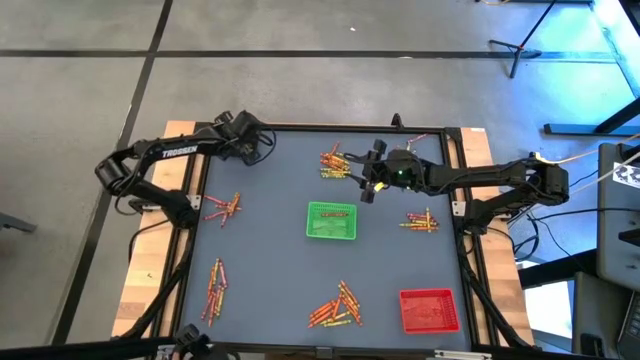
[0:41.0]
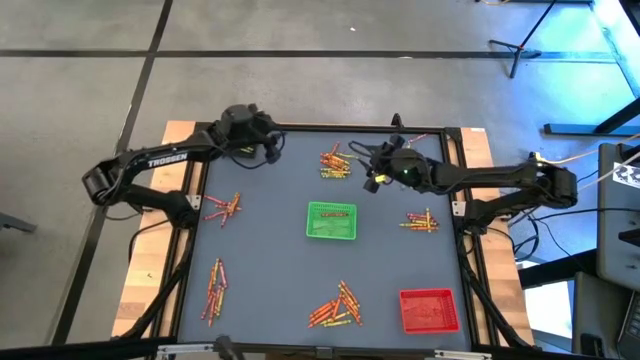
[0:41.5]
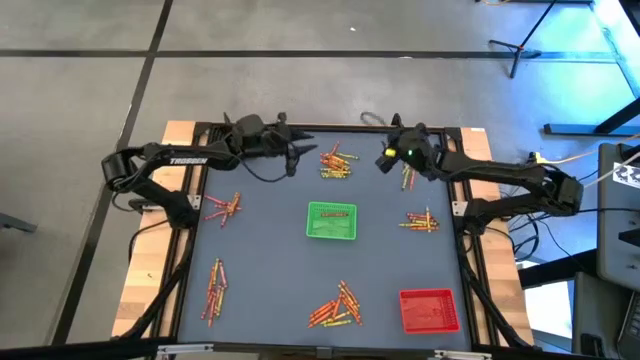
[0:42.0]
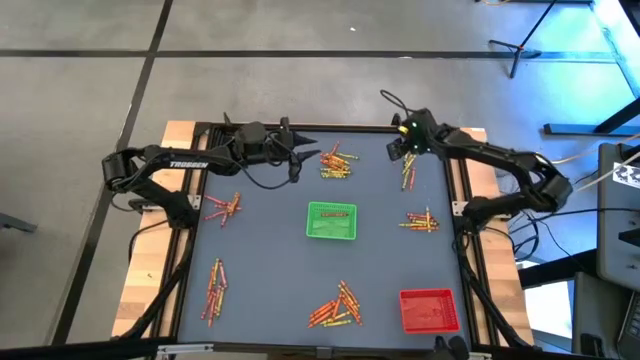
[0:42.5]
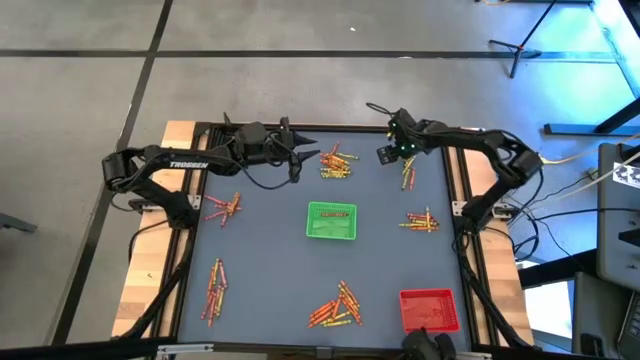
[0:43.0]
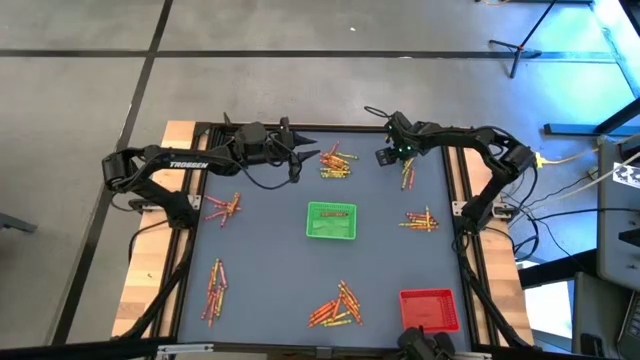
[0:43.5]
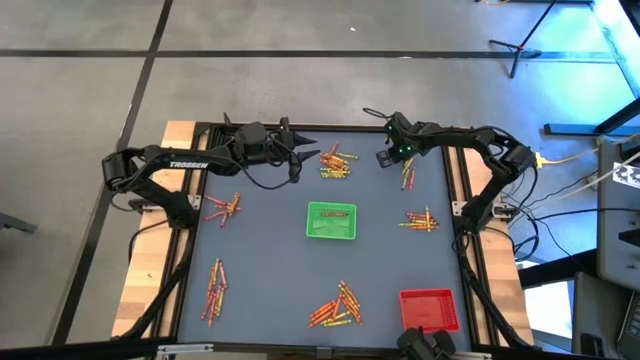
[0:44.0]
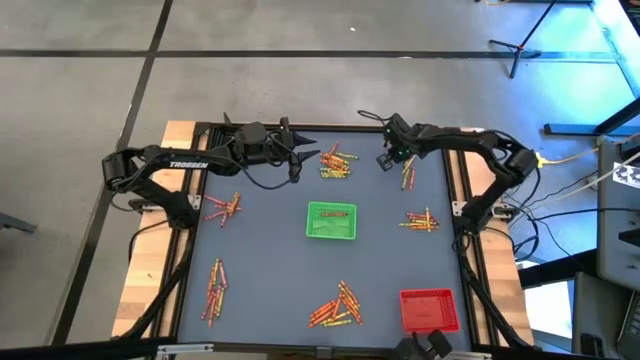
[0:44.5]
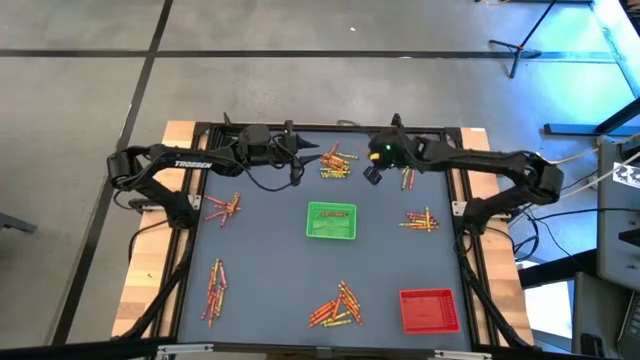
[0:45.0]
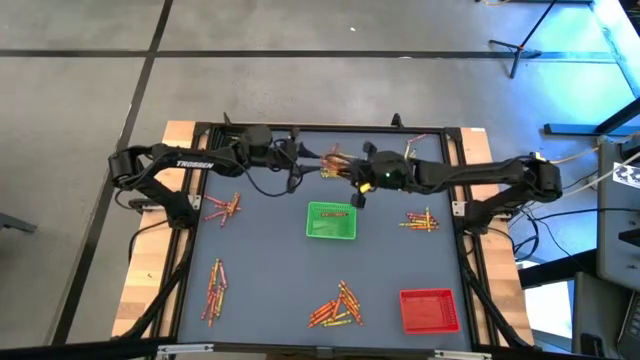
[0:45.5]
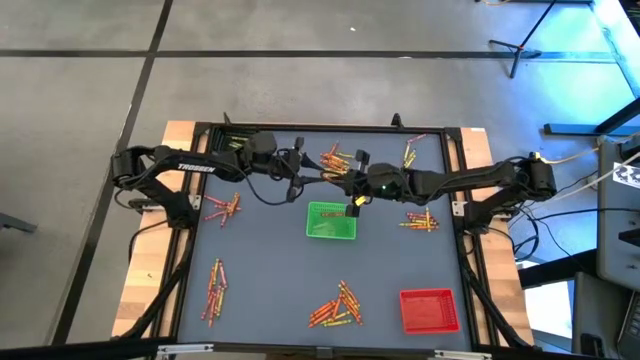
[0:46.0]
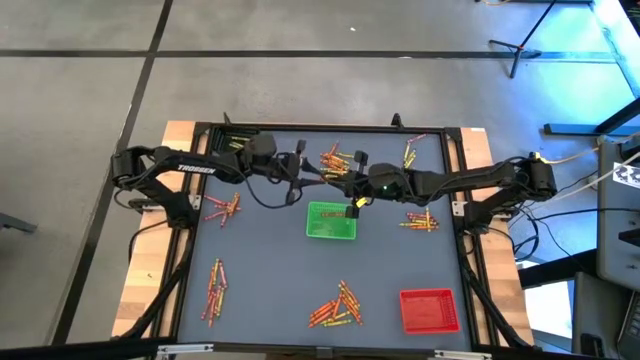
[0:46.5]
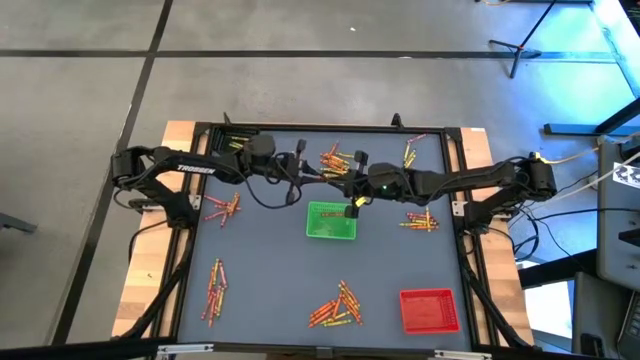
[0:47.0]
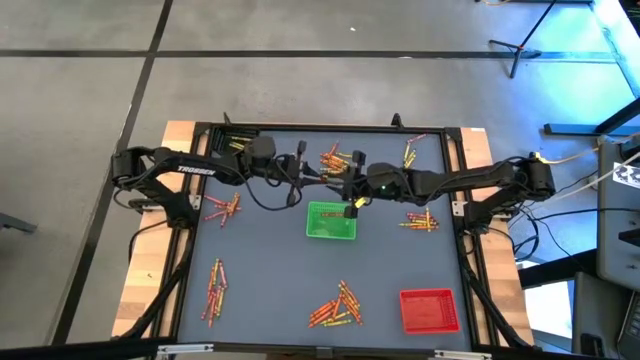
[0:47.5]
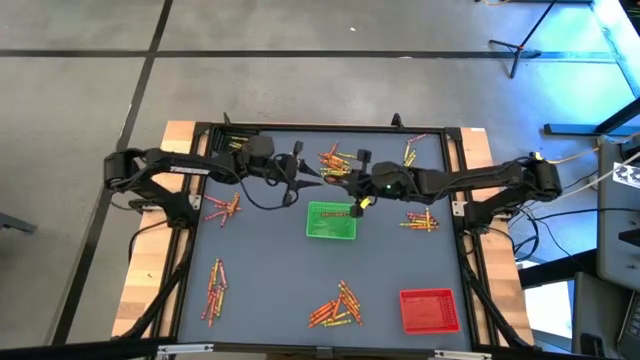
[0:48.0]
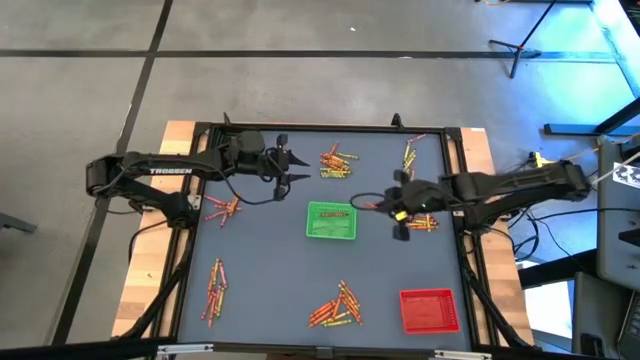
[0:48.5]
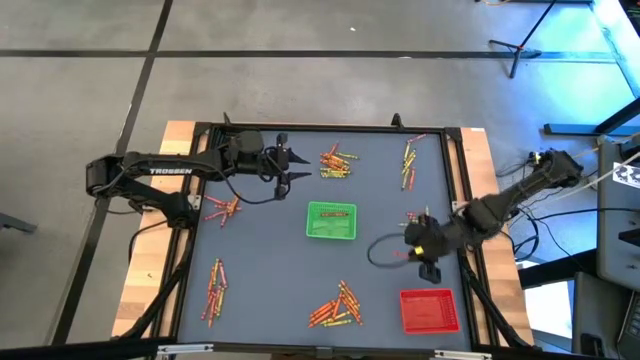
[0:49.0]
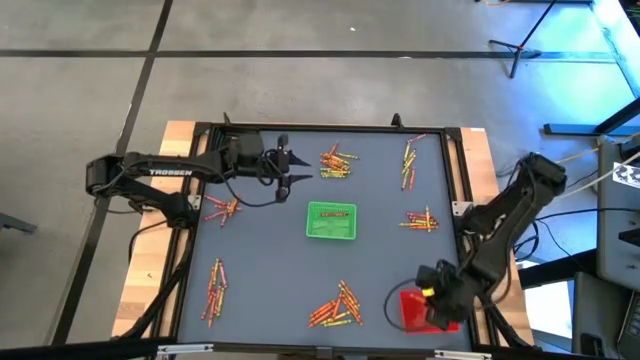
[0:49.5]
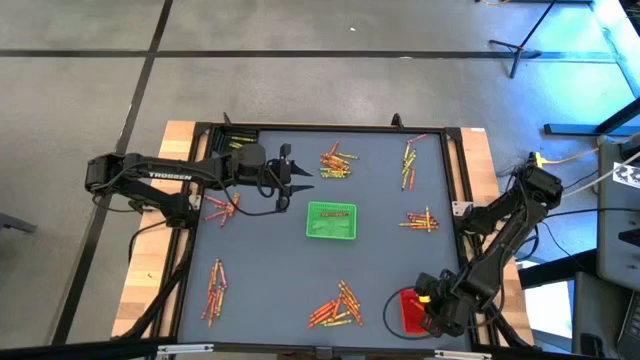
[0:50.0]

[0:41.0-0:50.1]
Task: Sort crayons
Put the orange crayon into the red bin

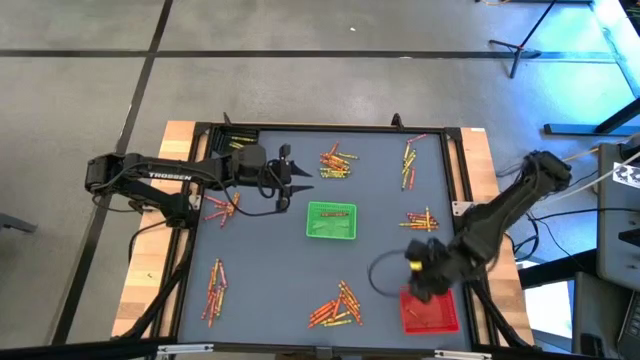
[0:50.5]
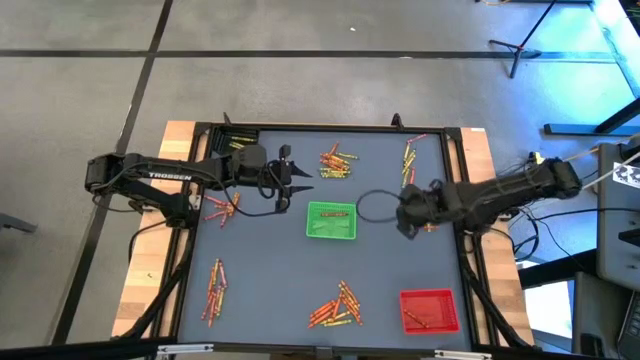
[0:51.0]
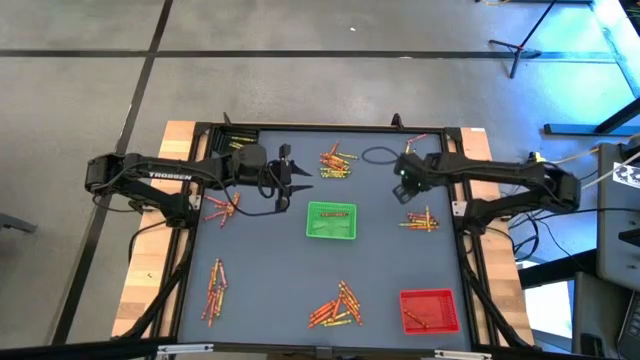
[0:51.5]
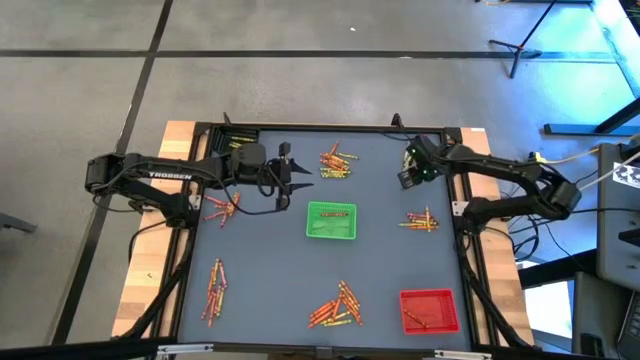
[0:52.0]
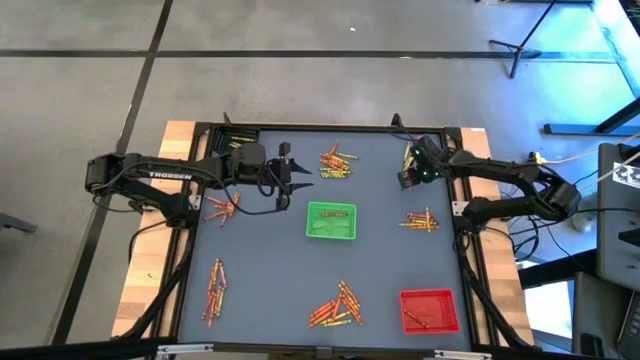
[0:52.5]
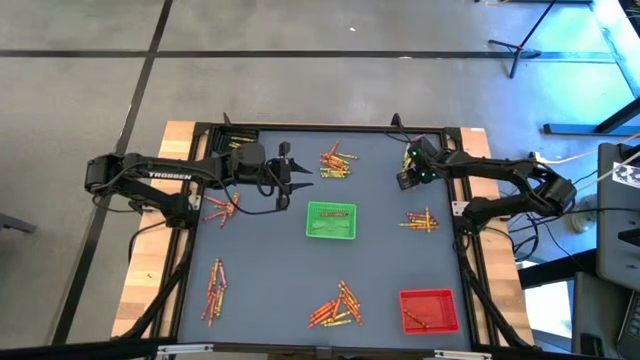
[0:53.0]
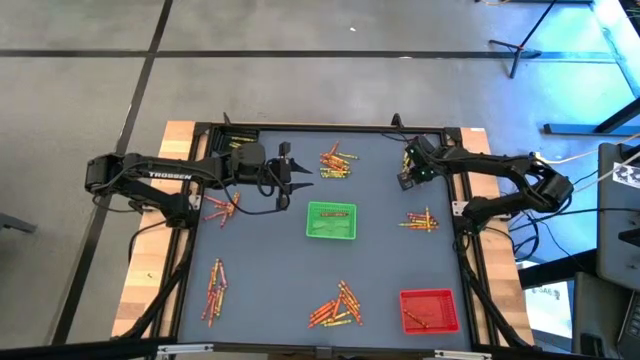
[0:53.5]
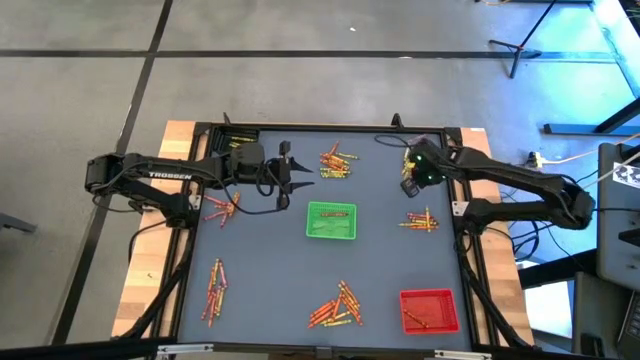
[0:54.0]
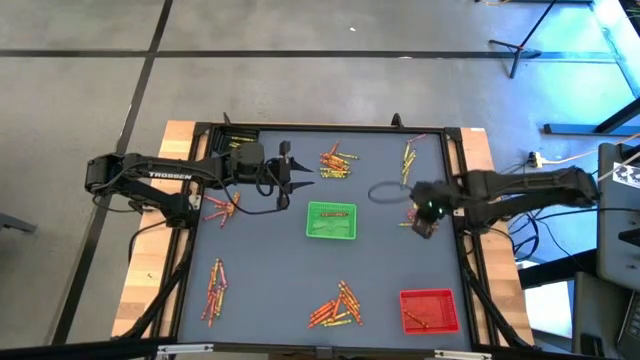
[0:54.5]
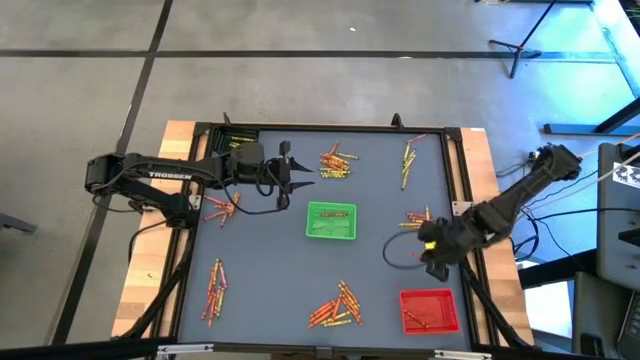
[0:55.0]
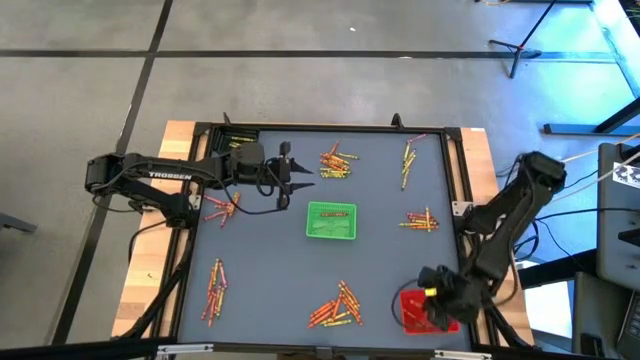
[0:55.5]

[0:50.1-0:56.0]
Put the orange crayon into the red bin

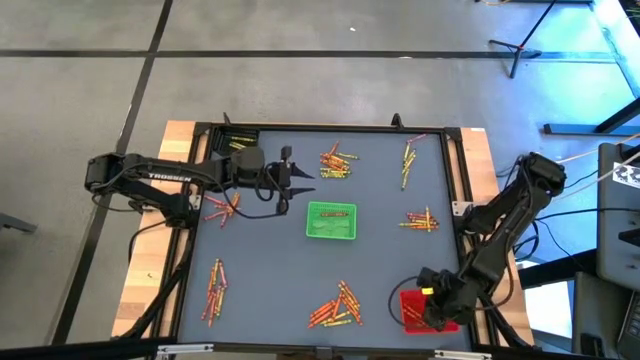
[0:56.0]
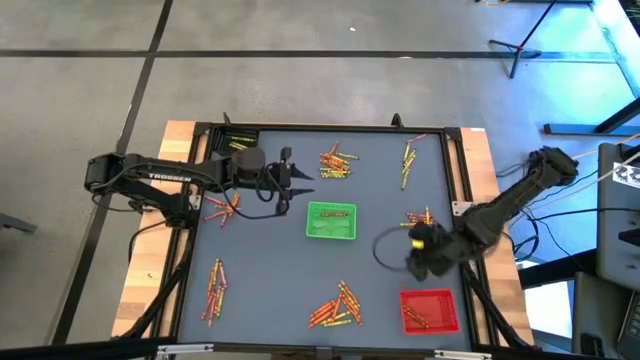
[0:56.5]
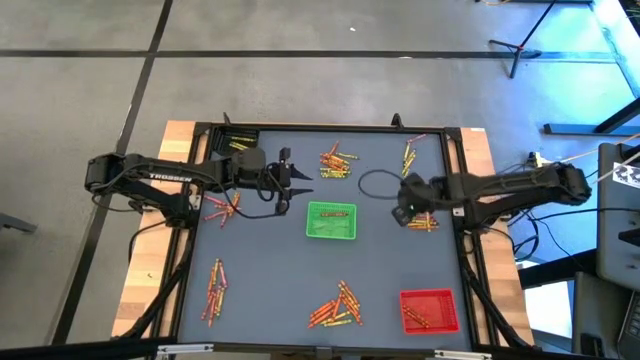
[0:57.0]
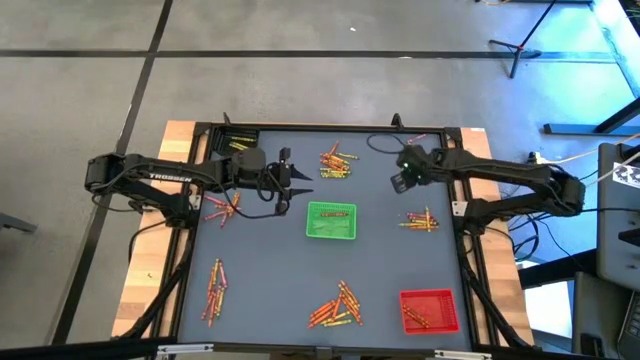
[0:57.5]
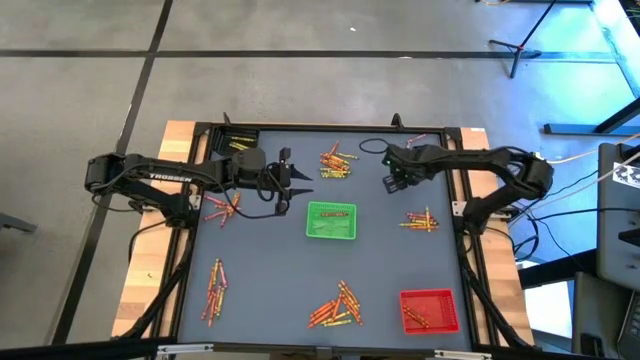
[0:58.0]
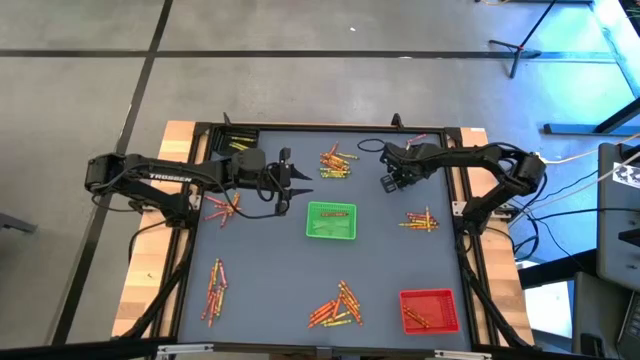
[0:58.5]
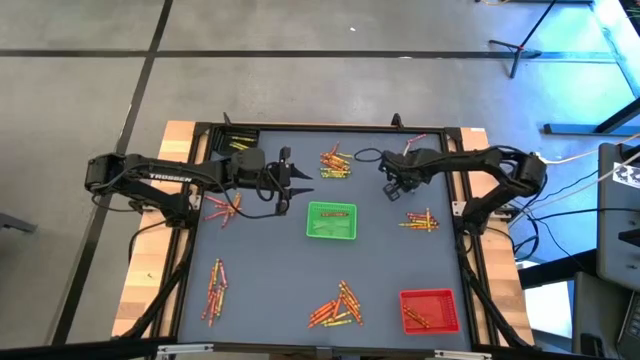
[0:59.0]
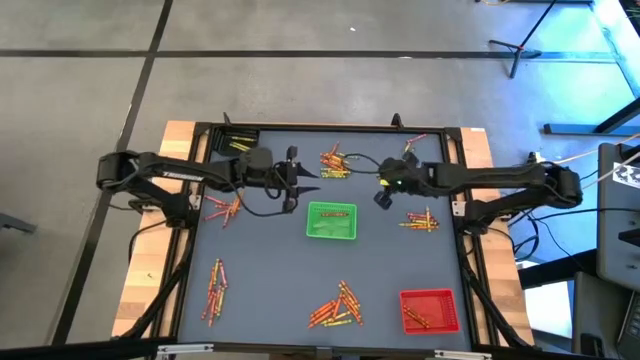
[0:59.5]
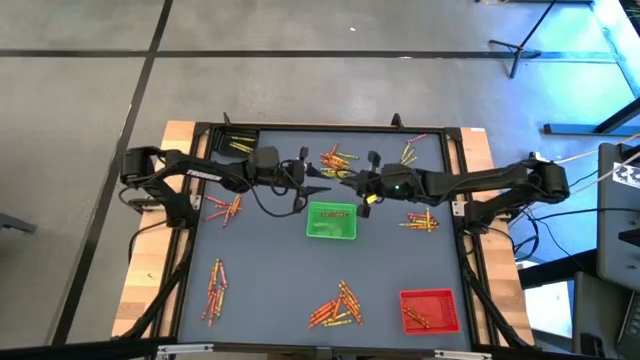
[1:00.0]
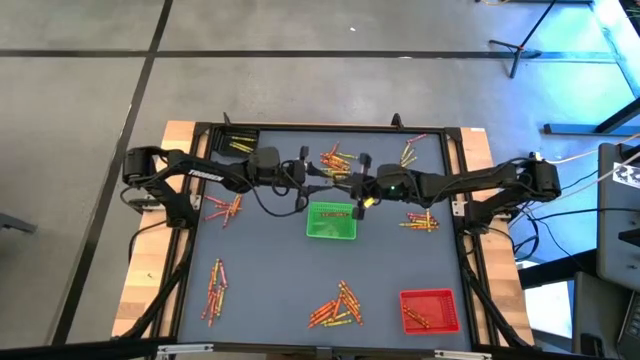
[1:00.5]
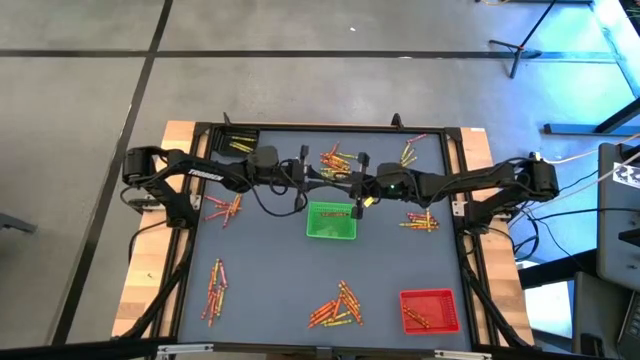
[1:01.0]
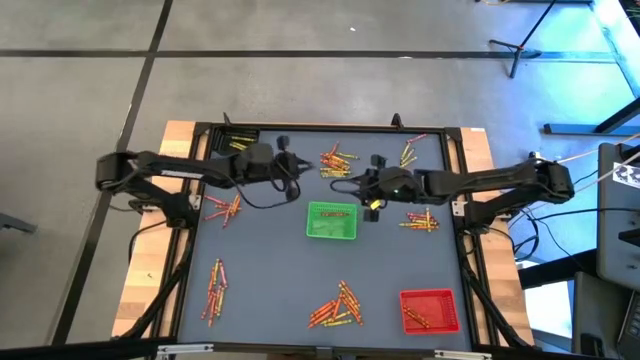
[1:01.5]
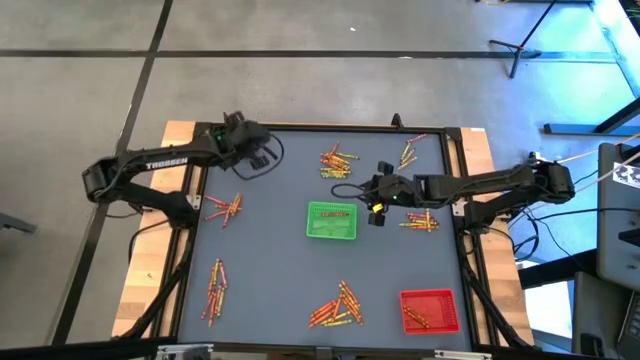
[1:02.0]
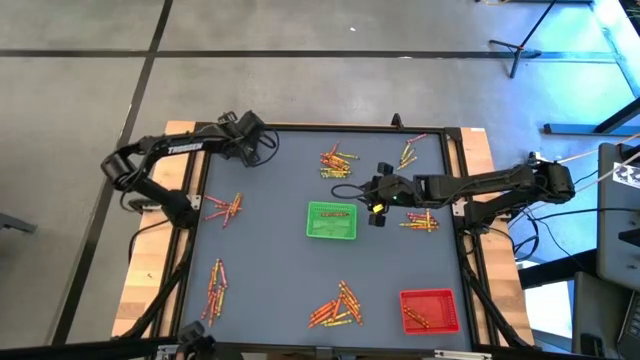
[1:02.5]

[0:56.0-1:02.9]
Put the green crayon into the black bin
